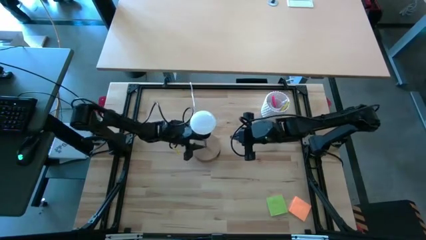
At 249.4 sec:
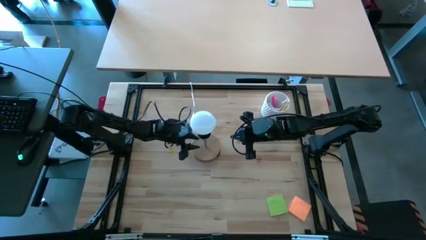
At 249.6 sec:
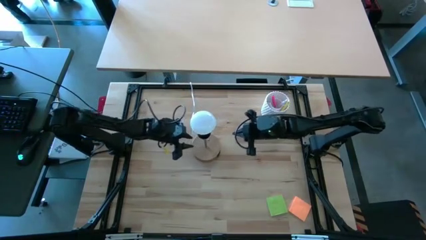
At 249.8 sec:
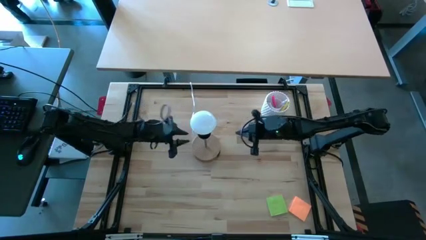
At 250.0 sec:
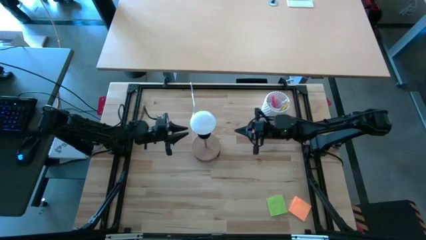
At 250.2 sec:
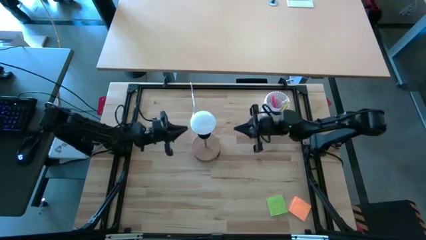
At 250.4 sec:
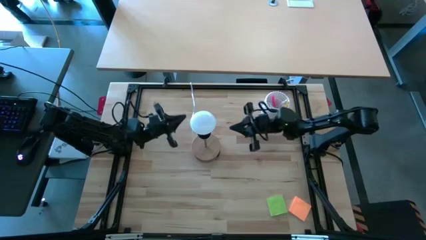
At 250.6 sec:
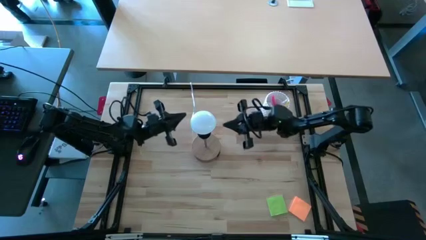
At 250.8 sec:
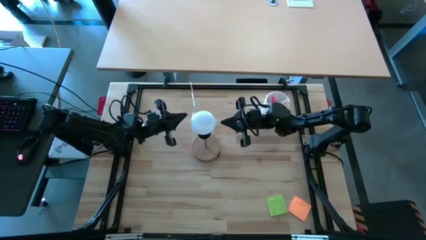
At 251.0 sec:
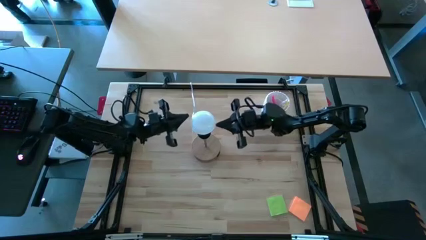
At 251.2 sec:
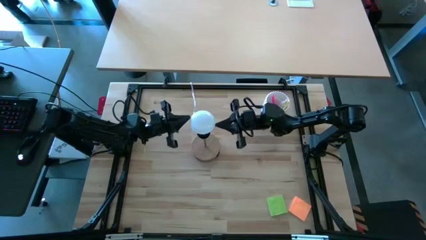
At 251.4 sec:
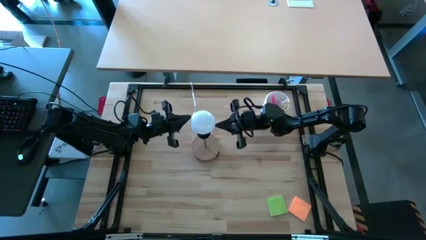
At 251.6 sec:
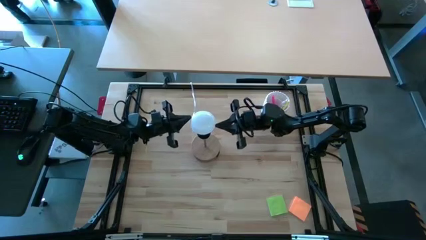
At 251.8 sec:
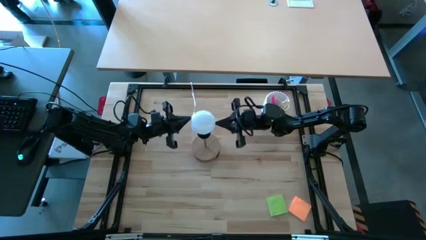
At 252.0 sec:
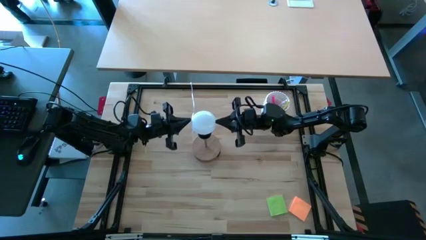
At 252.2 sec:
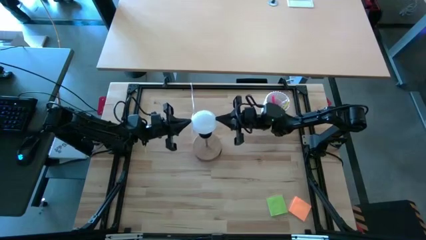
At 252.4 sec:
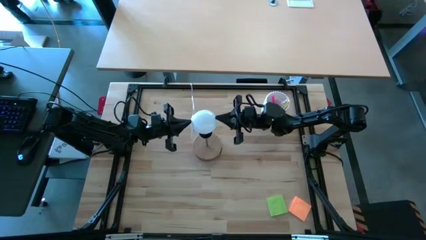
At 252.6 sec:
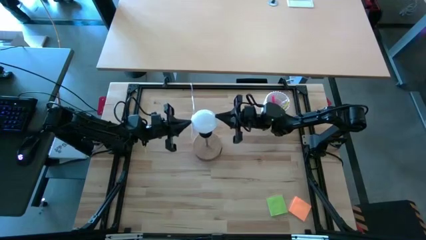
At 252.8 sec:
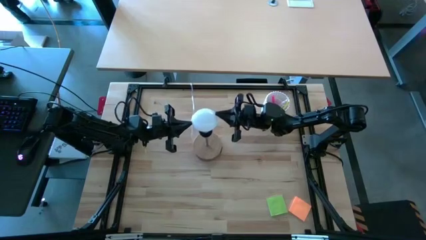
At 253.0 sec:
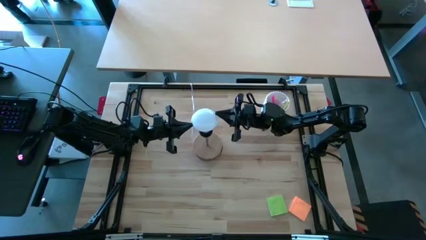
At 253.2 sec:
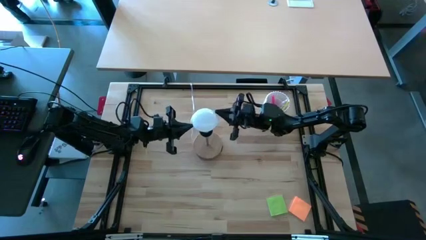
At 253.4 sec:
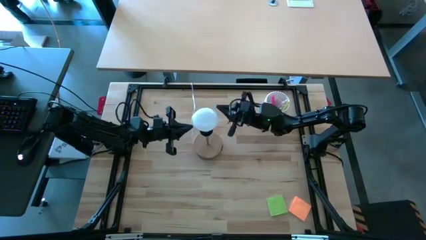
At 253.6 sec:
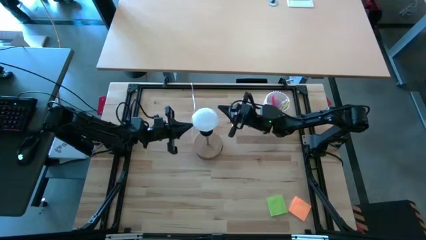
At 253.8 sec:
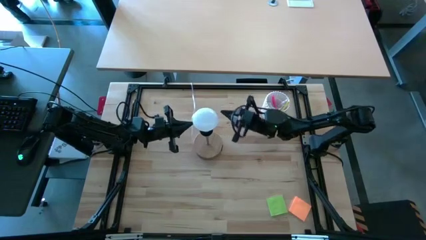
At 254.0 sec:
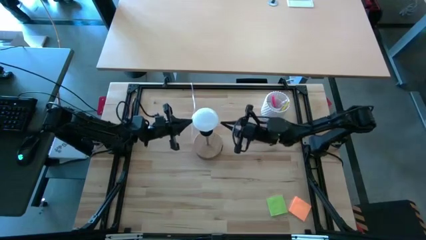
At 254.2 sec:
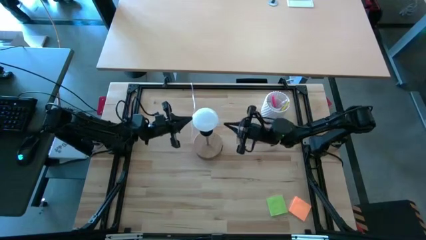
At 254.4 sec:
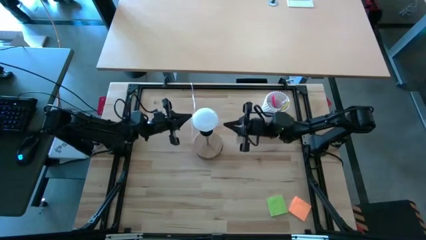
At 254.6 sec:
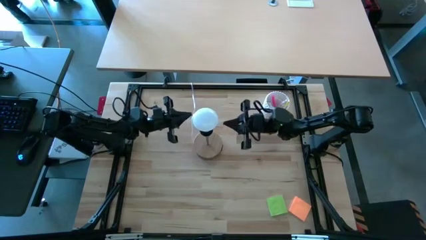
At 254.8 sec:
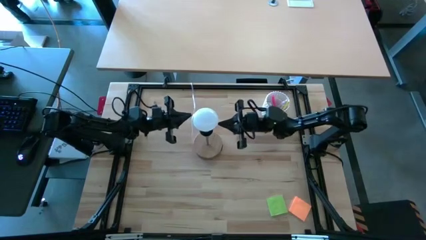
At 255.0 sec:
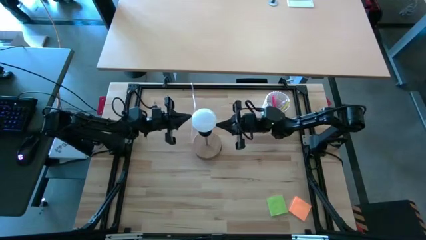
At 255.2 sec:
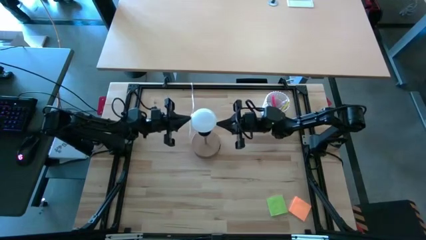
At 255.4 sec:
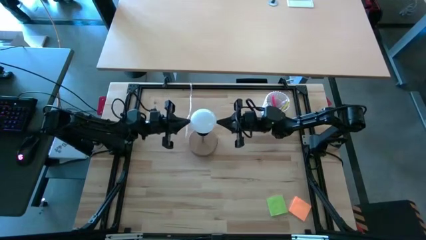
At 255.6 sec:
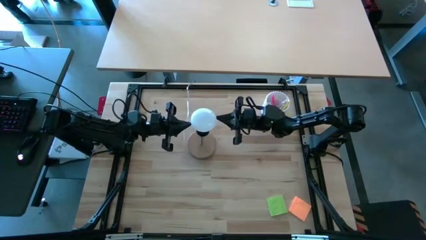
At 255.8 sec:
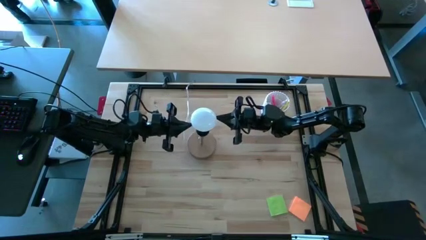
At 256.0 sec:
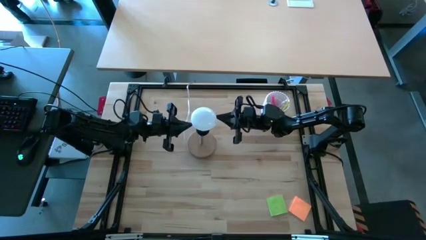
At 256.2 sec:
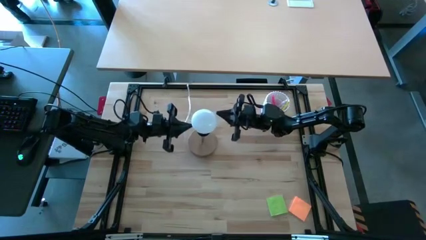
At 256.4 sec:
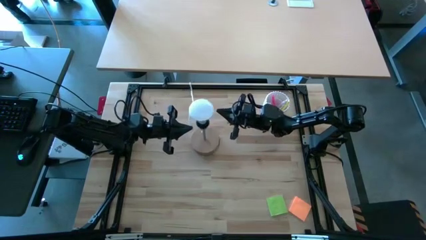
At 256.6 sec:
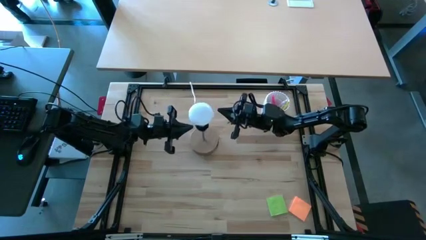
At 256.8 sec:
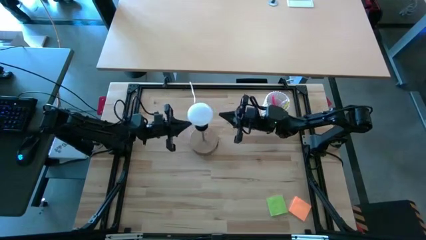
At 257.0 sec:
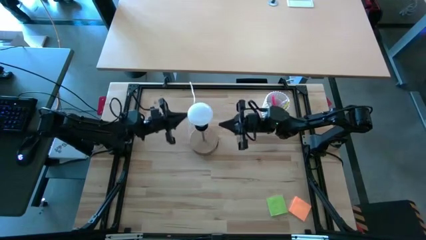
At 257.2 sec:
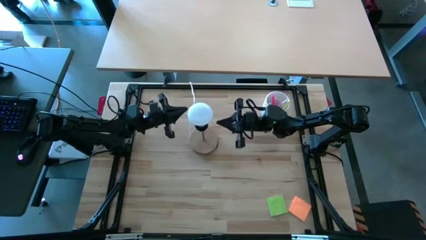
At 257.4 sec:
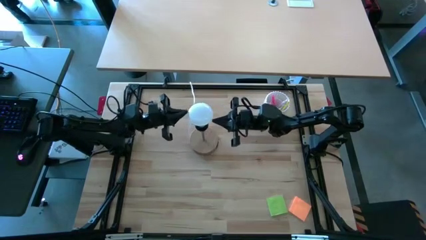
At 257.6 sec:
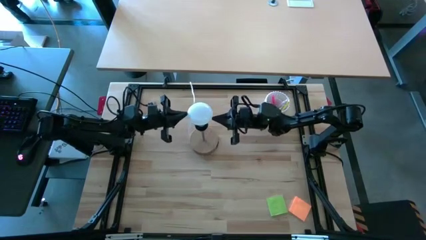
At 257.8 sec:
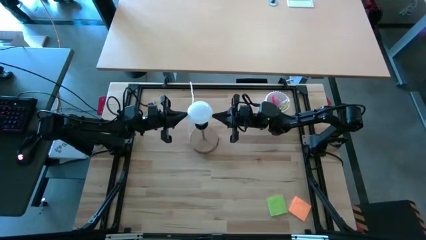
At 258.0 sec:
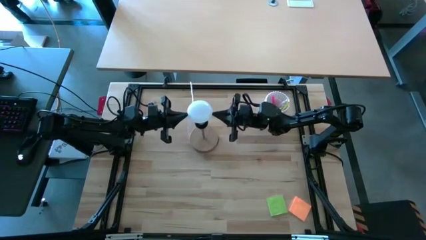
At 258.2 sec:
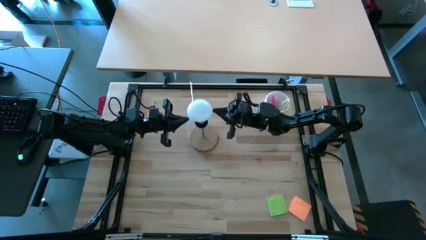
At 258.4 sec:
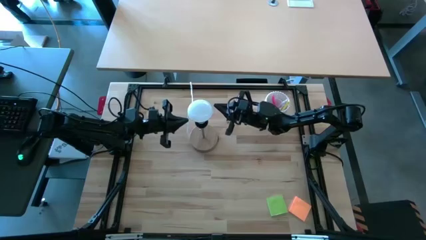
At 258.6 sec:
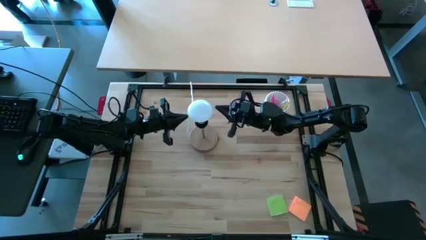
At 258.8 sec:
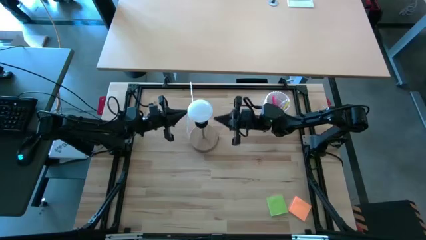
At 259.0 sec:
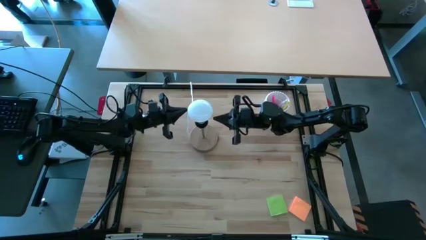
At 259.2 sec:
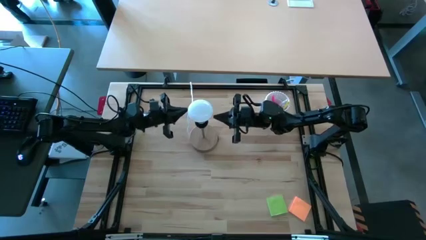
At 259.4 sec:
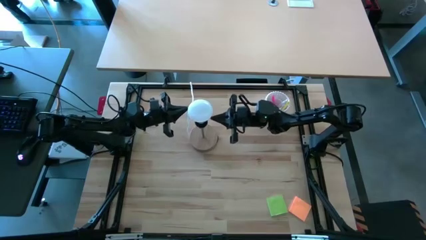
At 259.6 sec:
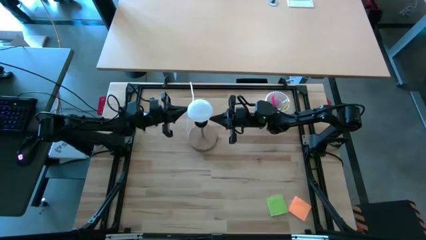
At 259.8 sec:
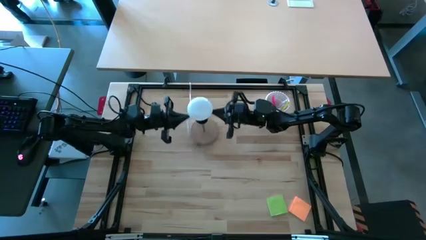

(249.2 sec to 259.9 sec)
Task: Screw lightbulb
Remove the lightbulb from the lamp

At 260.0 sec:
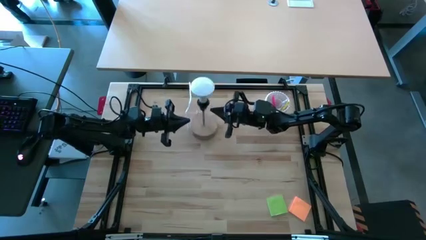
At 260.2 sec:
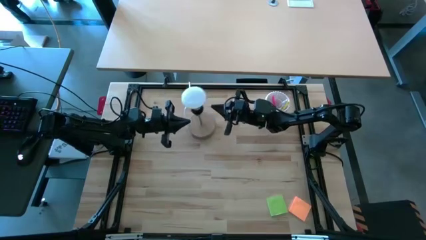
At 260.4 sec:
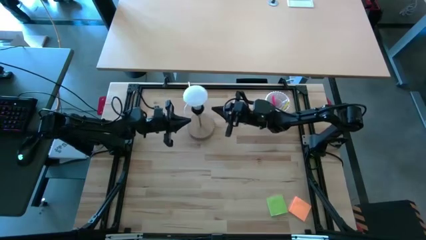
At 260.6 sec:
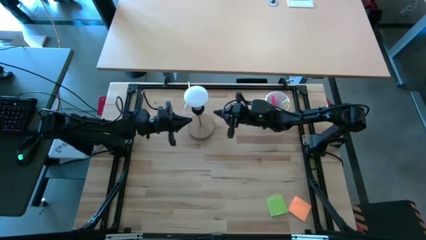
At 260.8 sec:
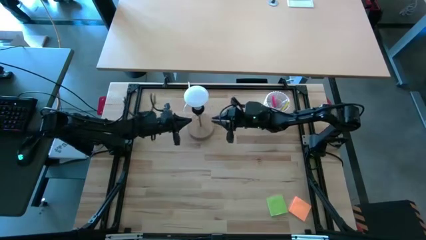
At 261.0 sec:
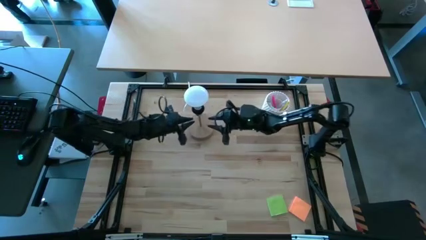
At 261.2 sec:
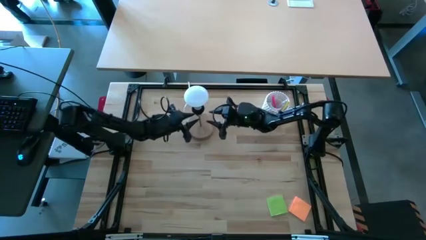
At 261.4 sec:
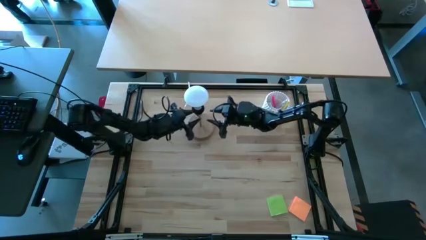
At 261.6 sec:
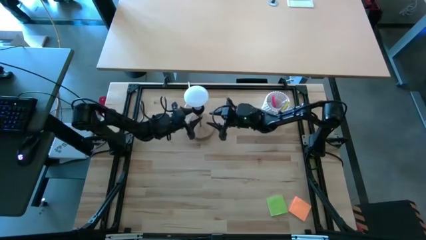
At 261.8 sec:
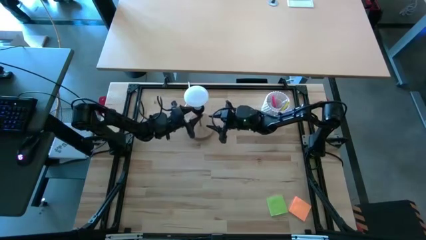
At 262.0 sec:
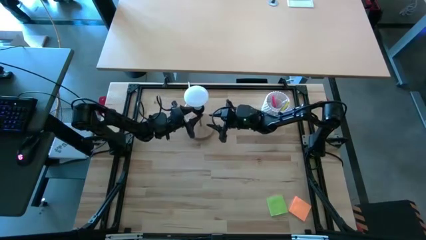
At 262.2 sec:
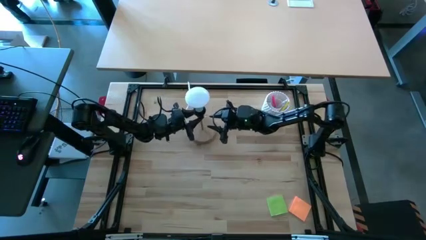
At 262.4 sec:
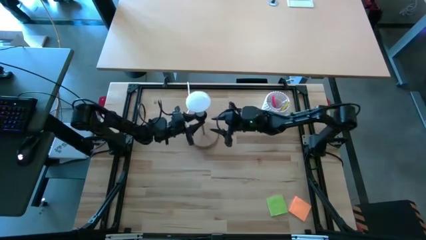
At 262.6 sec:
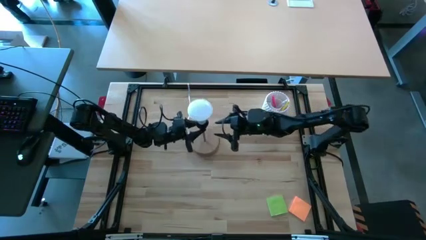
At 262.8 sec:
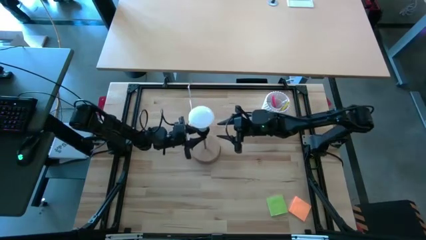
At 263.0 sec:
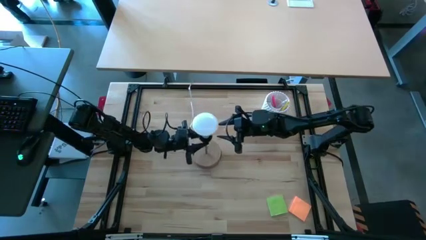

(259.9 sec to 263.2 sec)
Adjust the lamp

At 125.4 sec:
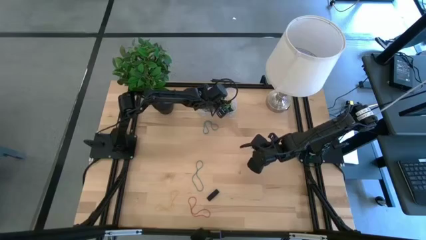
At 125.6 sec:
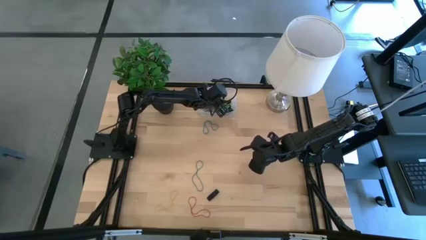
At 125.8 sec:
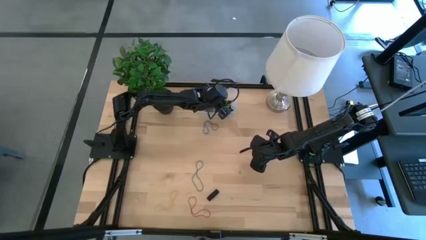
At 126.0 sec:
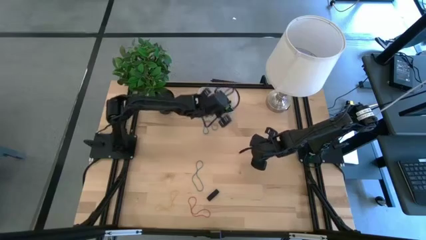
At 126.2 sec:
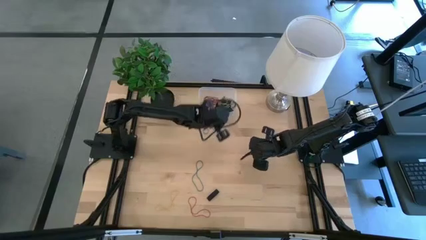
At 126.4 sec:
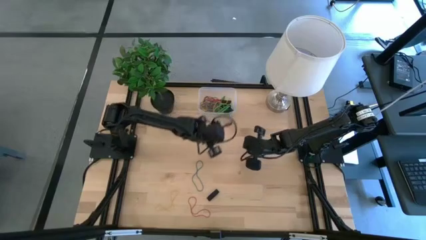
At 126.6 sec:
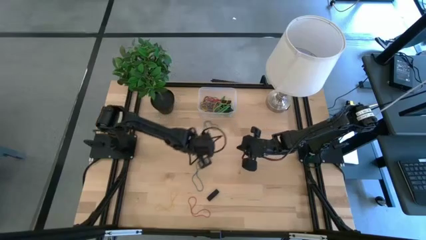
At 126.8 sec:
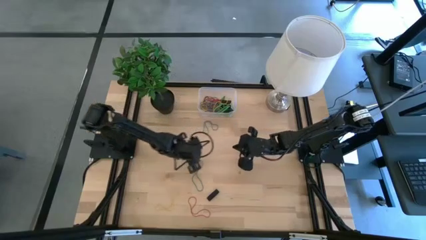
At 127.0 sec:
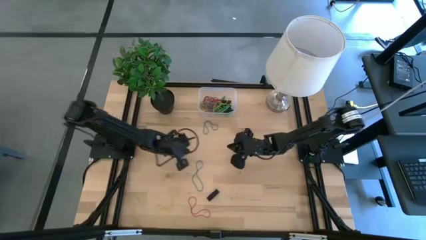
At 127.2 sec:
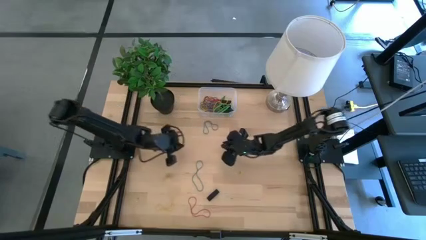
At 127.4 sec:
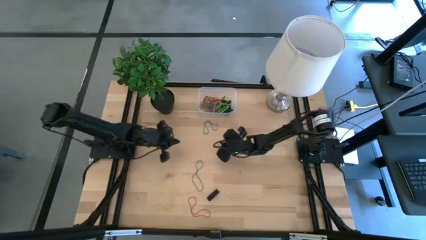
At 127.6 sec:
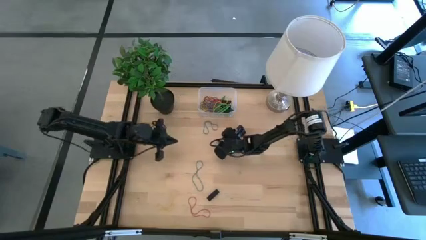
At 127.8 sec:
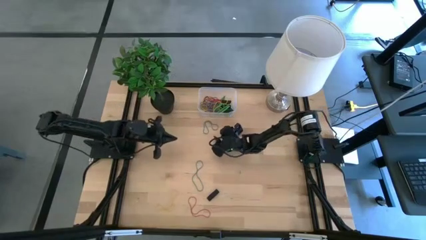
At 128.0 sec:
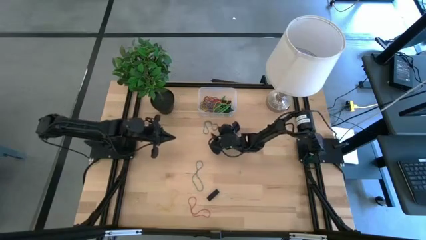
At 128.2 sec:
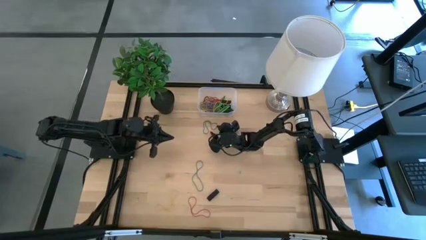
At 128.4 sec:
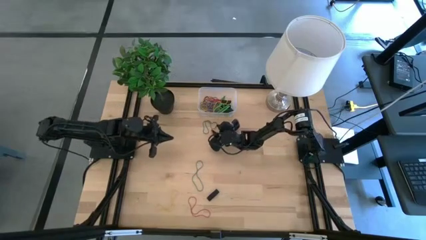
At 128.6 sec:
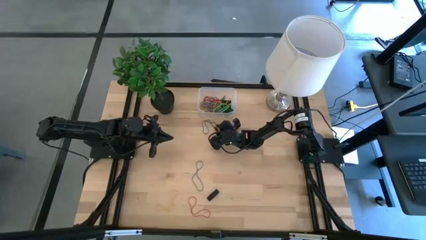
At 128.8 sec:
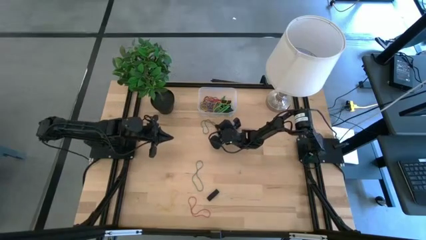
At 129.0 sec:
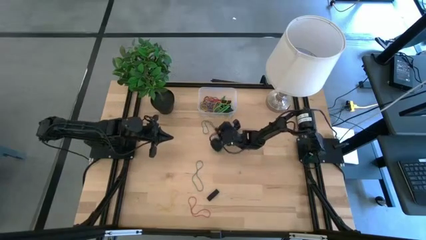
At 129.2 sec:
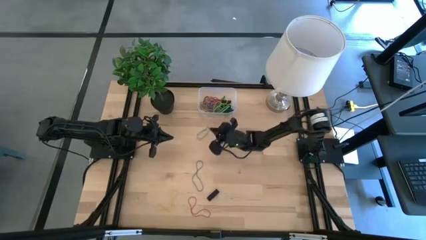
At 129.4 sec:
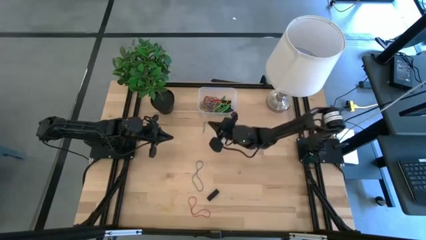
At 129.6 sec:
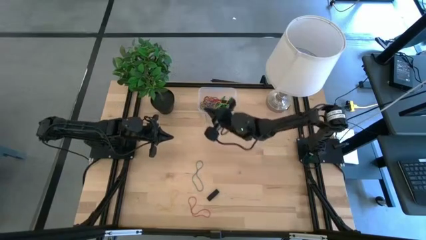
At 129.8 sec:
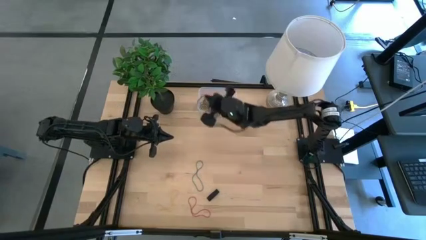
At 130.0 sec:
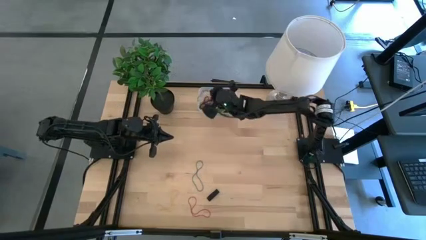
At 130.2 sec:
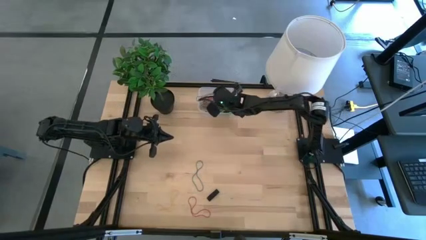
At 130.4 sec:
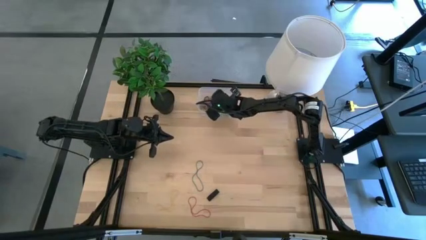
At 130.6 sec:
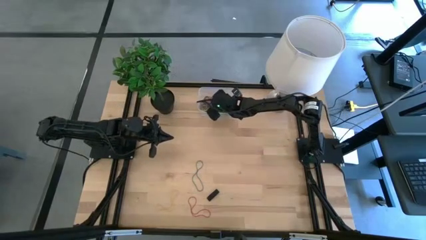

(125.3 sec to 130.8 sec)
Task: Pick and place rubber bands into bin
Put the blue rubber band into the transparent bin
